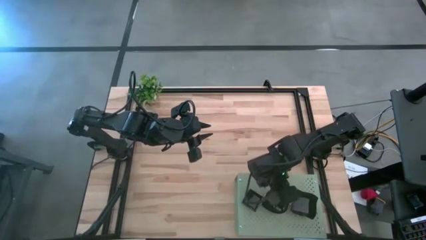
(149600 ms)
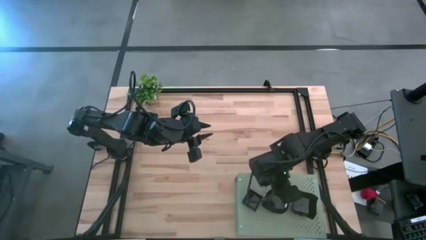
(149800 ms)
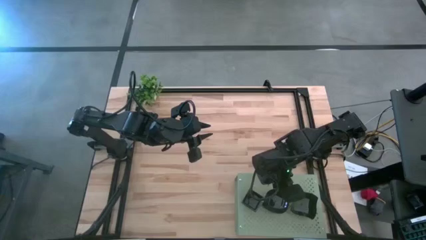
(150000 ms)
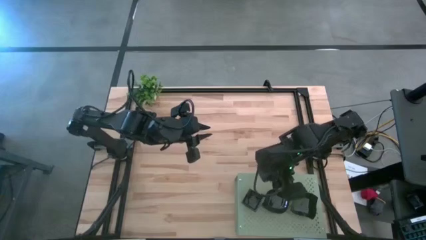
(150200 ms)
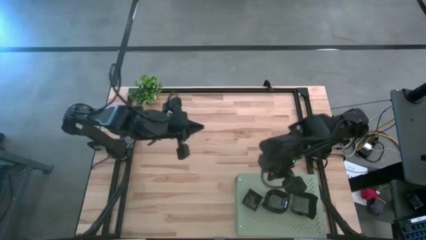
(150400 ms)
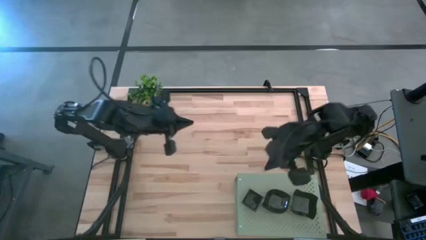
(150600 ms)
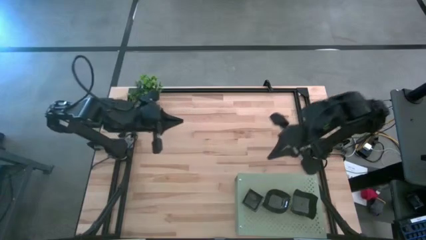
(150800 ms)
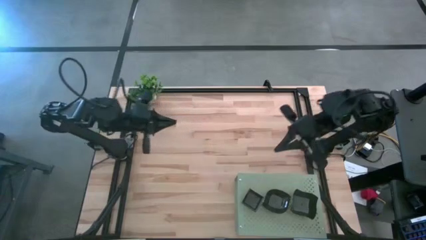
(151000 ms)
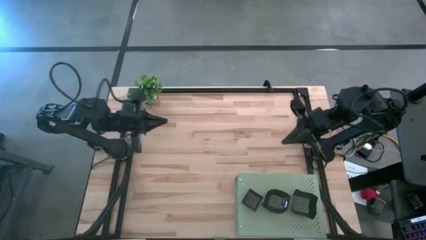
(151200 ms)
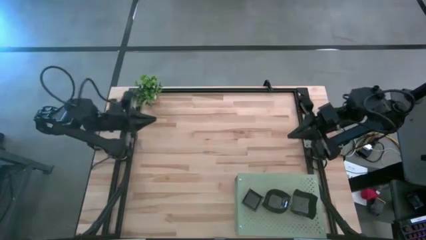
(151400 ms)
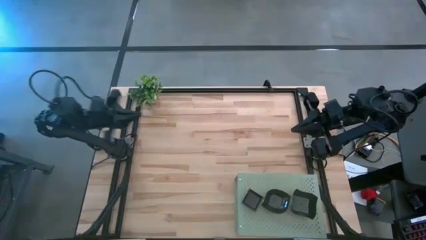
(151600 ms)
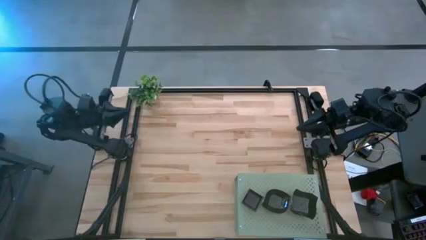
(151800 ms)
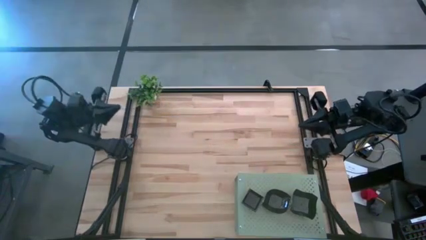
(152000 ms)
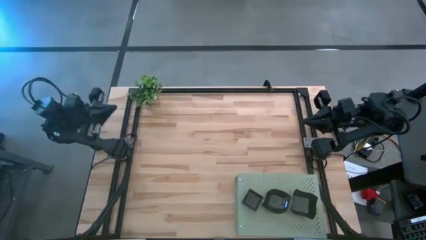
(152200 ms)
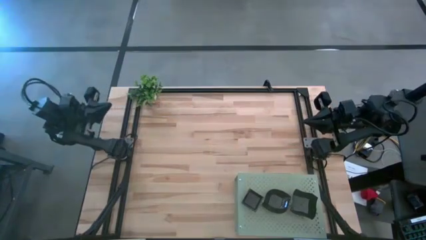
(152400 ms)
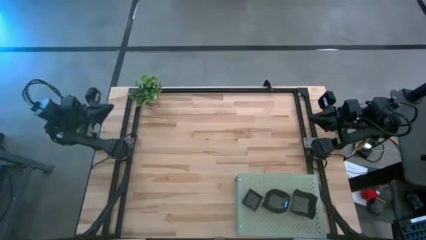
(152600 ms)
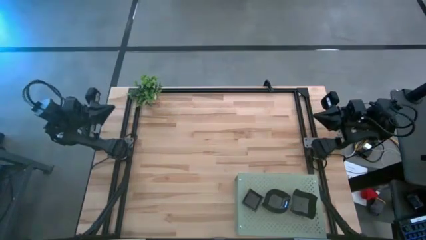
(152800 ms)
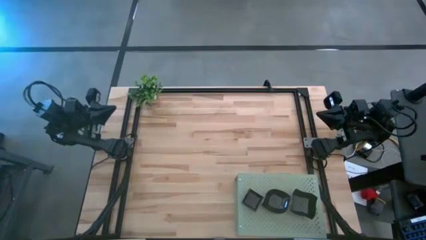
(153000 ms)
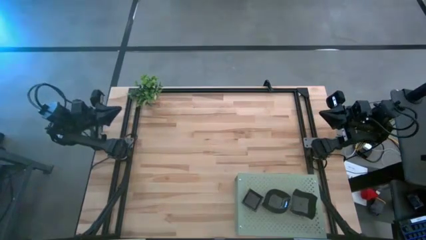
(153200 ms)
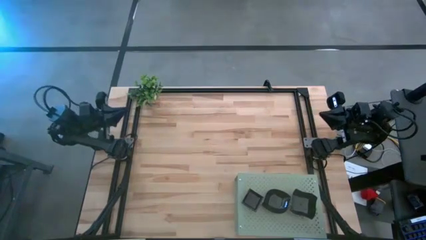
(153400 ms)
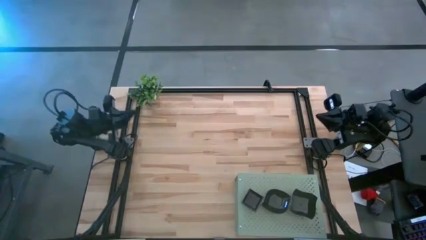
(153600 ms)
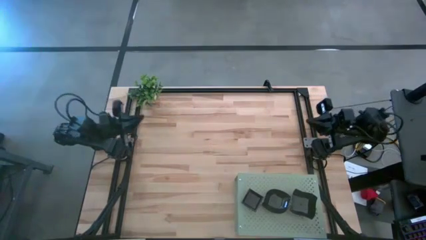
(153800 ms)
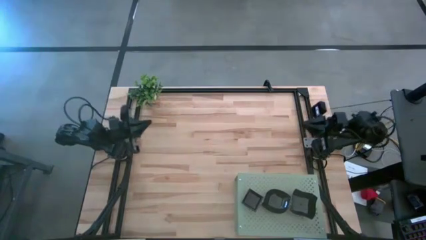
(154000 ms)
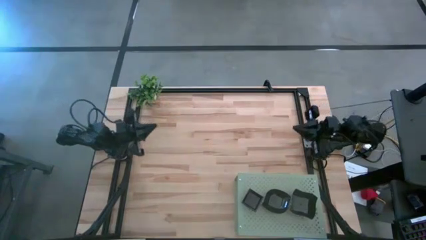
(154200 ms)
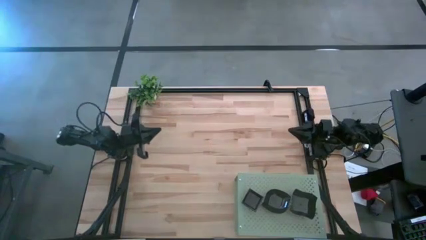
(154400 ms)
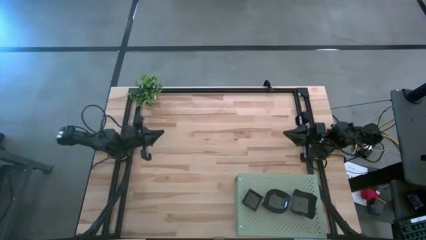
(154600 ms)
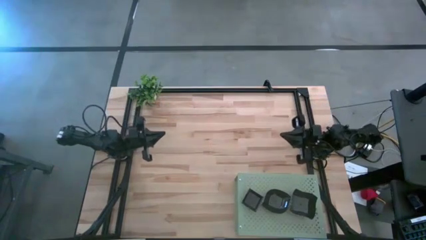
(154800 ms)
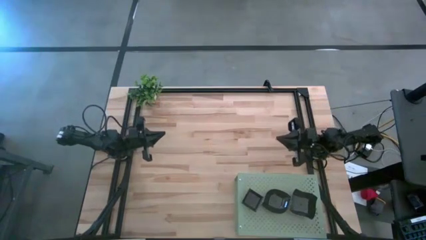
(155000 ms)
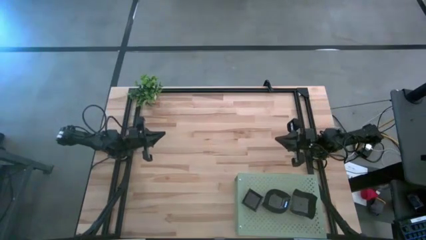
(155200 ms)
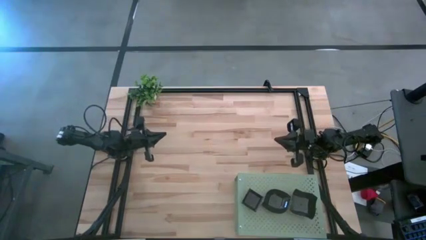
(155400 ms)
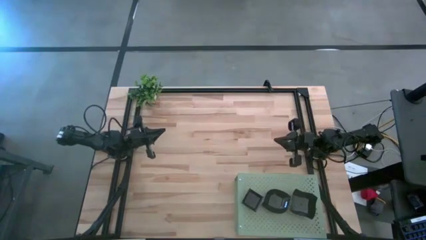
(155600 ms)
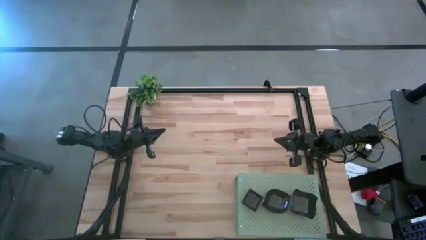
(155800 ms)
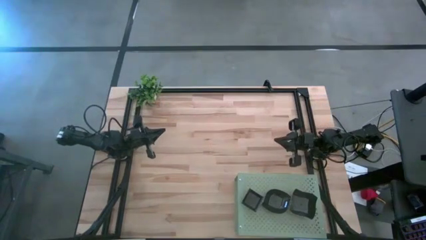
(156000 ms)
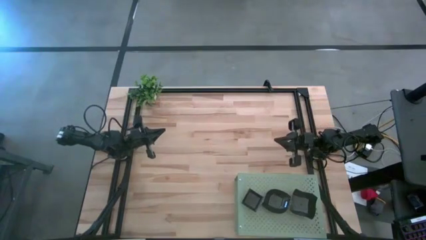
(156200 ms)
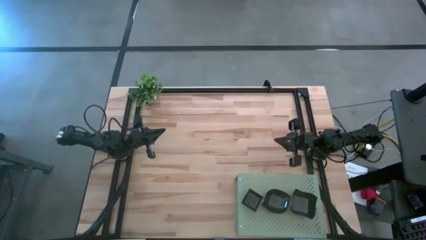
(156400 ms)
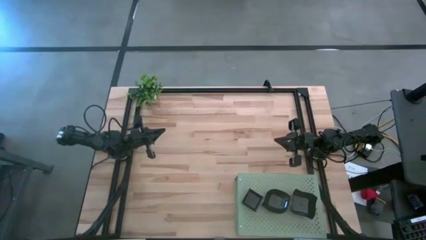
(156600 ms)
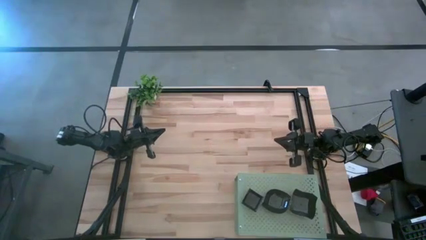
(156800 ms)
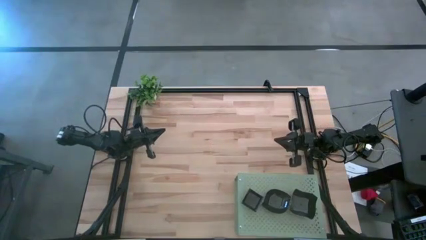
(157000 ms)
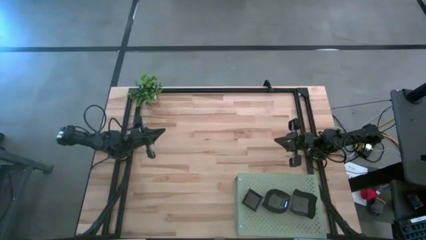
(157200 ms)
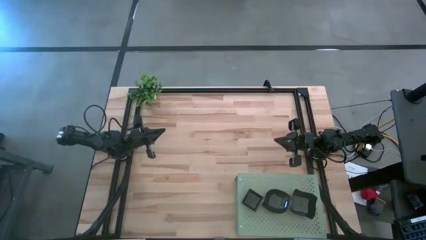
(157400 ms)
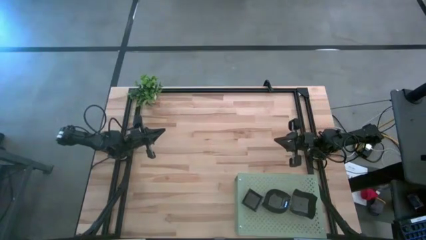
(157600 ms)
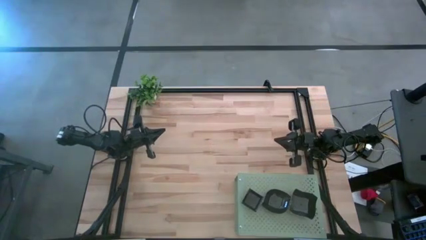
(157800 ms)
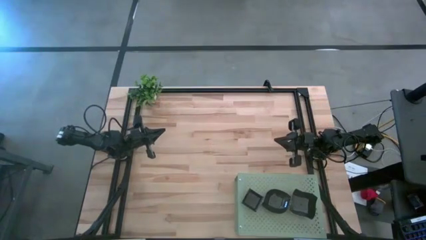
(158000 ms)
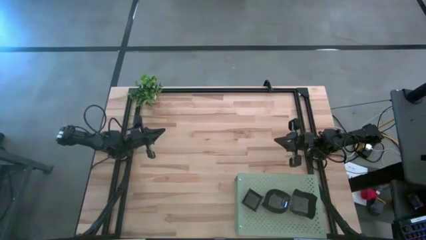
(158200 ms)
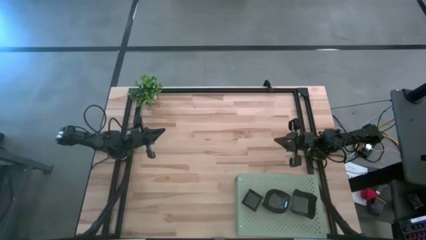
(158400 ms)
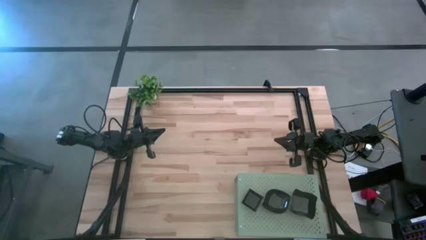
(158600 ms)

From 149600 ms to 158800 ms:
Task: Pick & Place Mini shaped plates
Return to Home Position

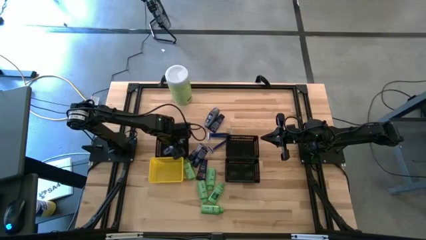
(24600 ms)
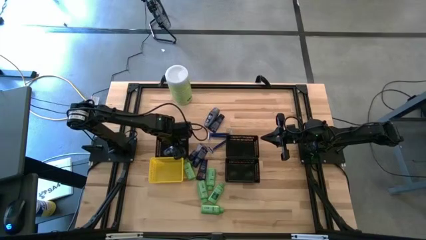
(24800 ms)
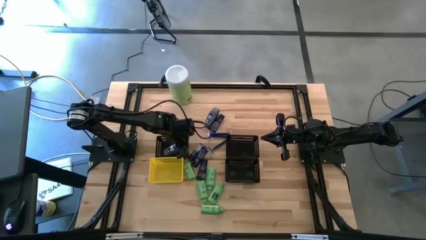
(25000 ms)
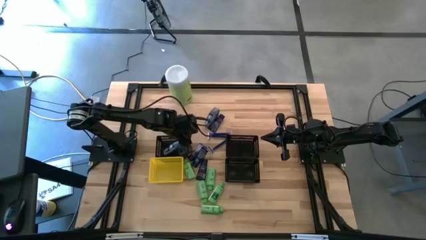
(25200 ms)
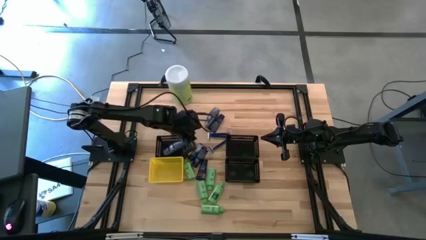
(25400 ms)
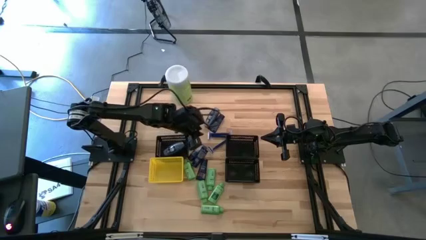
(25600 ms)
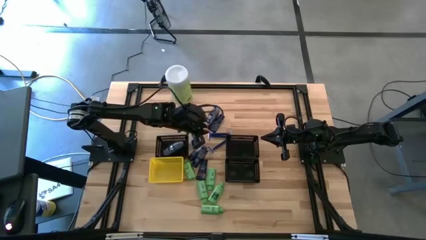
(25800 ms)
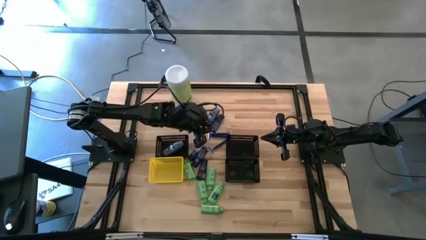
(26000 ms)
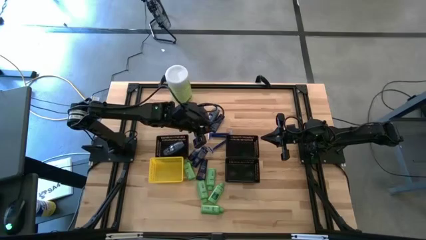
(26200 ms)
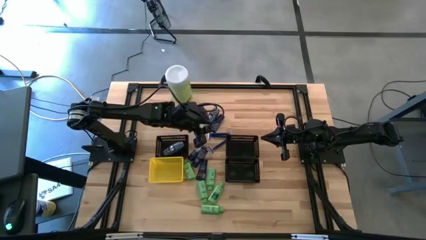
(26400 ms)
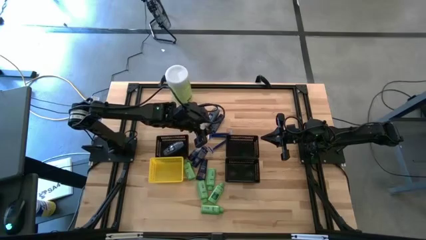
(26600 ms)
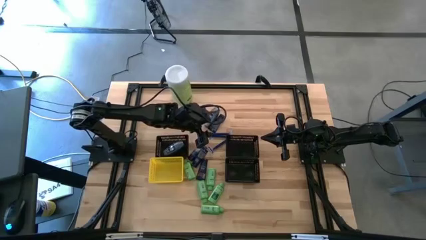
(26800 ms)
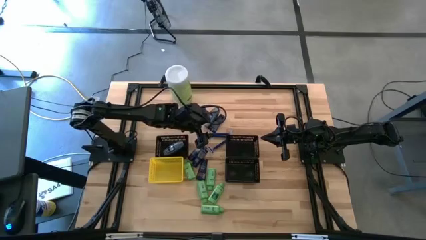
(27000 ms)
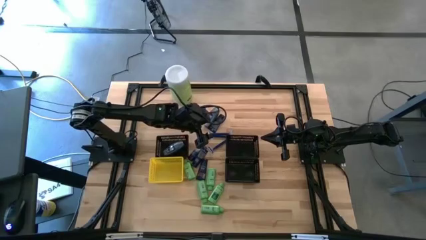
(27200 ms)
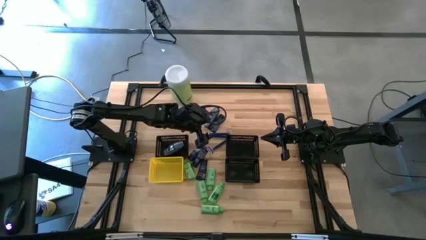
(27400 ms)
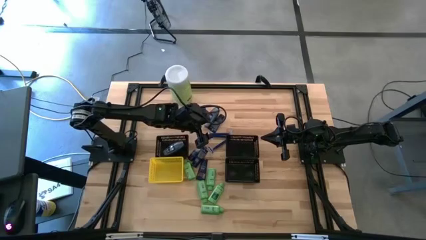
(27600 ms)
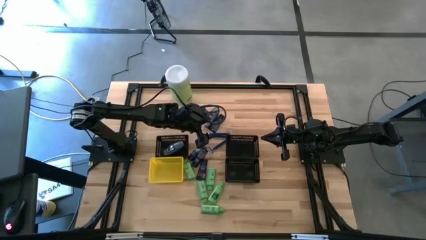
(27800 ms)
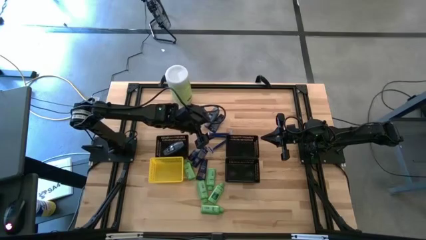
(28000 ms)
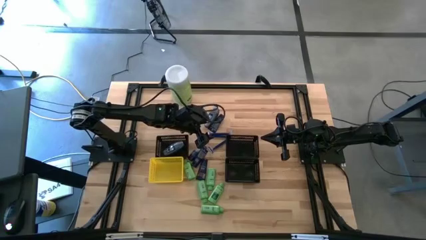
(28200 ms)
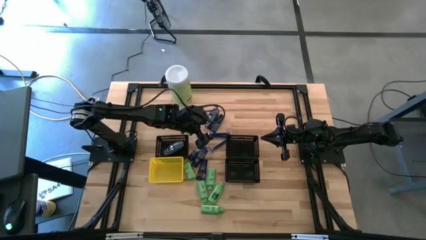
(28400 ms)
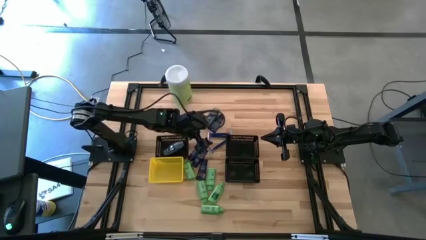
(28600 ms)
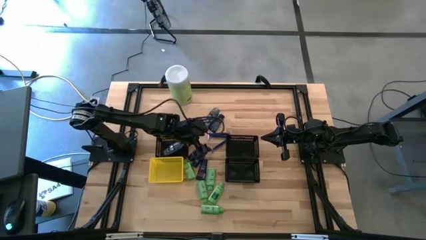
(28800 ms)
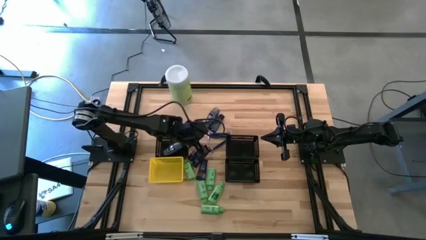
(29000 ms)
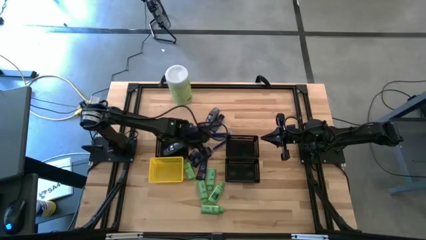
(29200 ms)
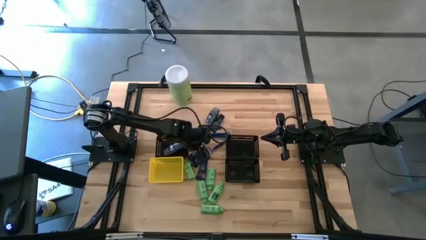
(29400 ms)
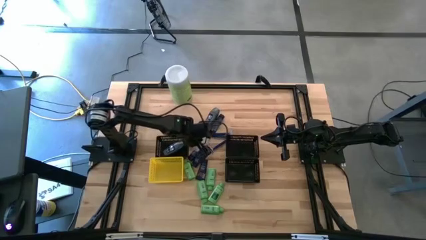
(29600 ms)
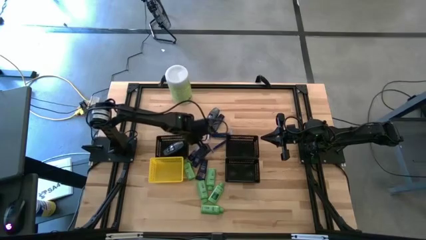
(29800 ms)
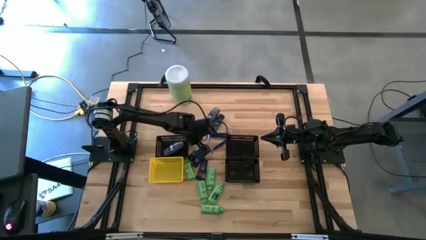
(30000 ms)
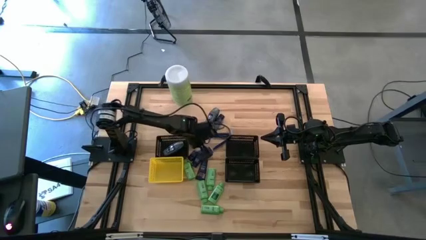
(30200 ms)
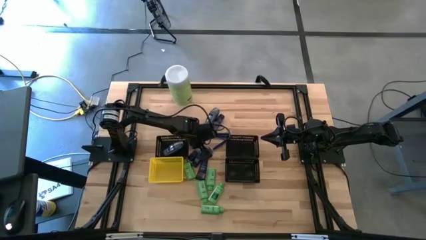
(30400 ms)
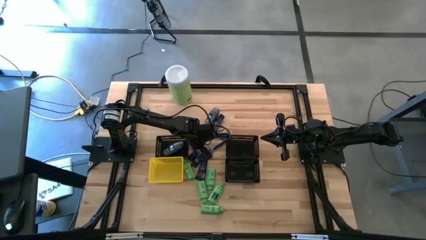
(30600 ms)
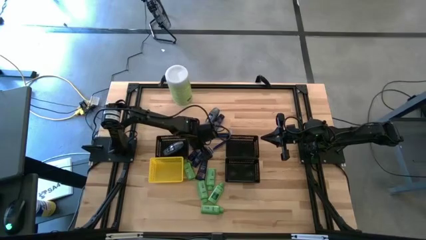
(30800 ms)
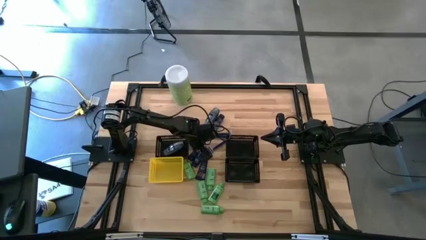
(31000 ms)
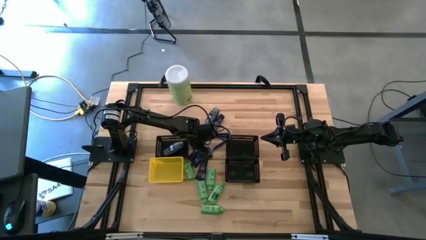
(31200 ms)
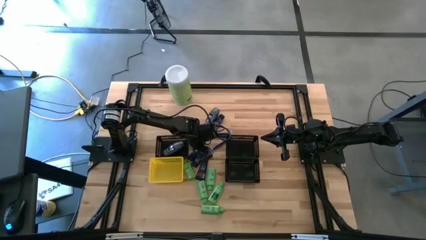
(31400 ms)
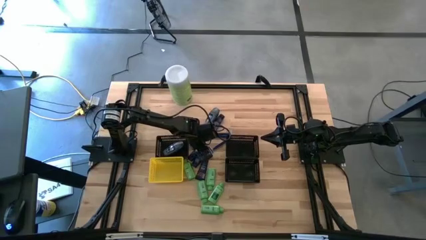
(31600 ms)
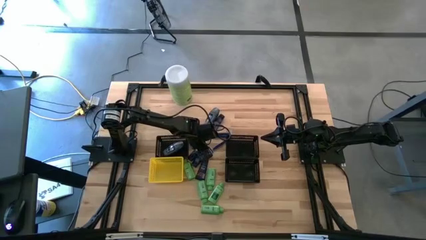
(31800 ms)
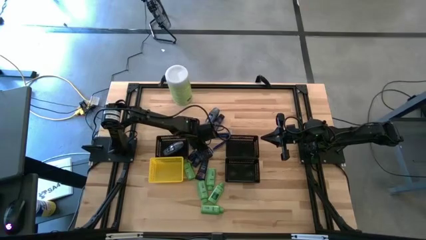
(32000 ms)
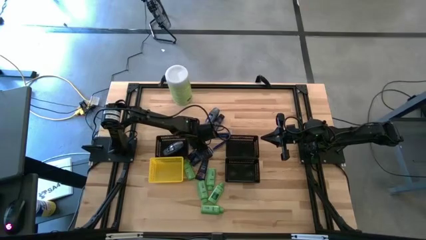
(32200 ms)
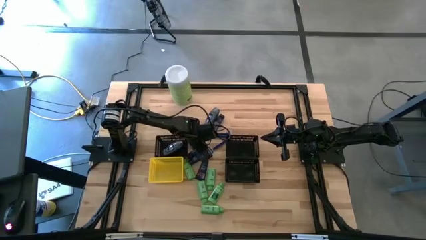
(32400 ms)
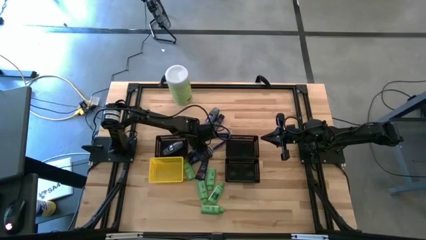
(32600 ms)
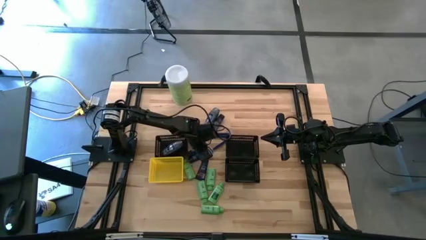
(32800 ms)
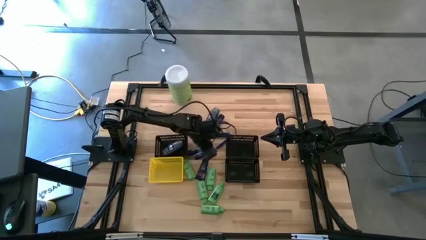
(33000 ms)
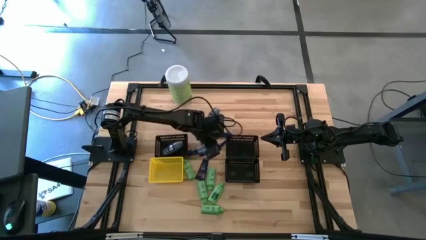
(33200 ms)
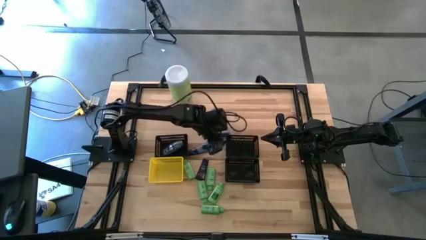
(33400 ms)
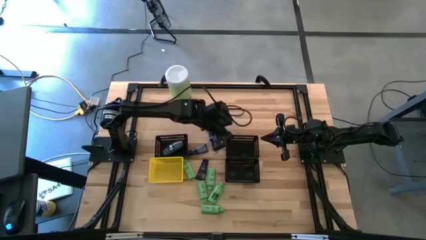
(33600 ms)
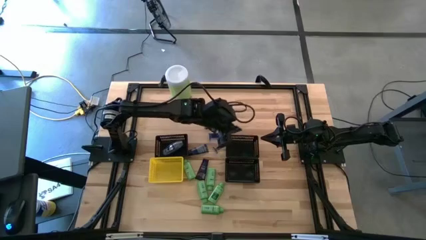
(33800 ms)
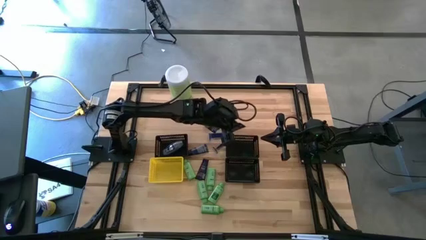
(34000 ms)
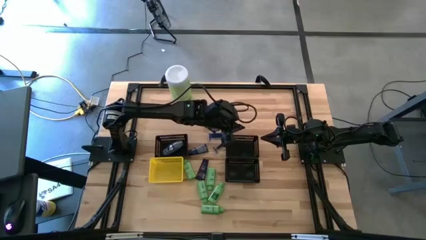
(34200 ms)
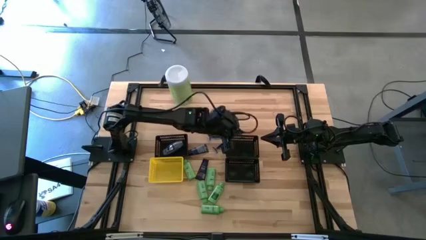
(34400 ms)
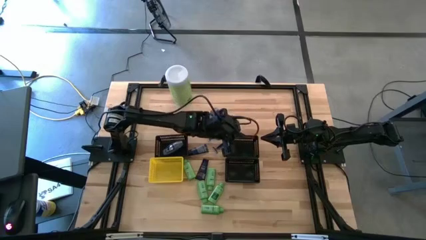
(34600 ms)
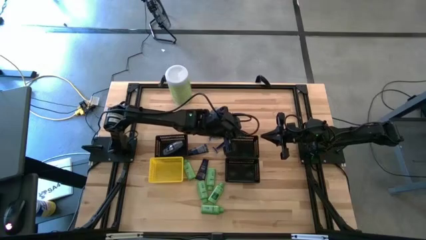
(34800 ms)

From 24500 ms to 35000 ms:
Task: Pick & Place Travel size toiletries
Put the blue shave cream into the top right black bin
